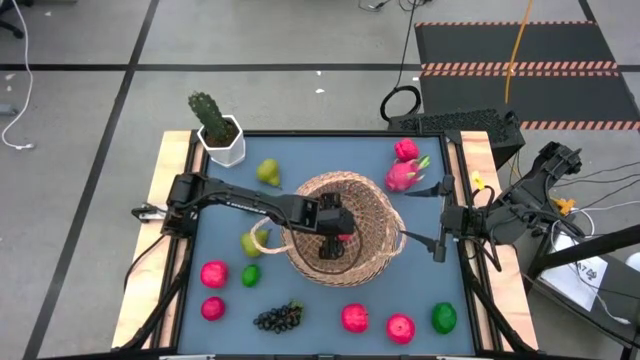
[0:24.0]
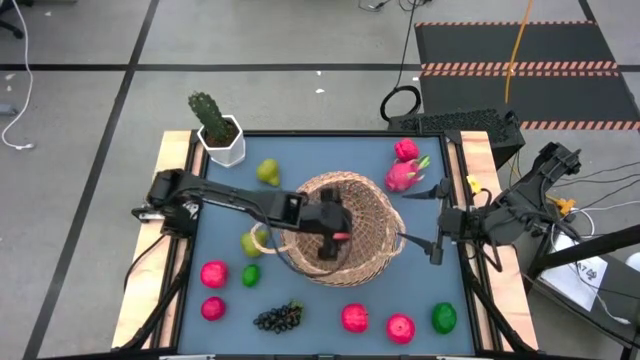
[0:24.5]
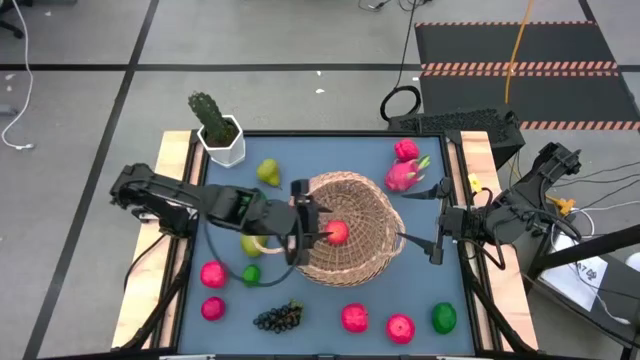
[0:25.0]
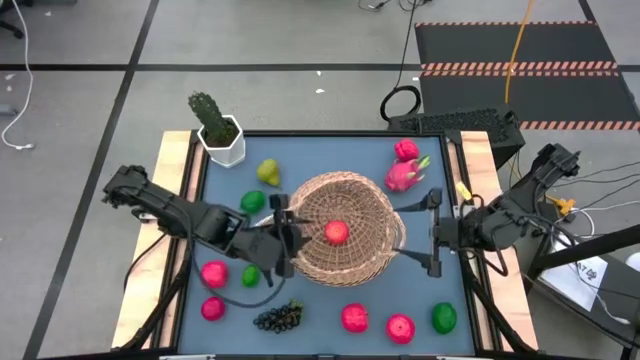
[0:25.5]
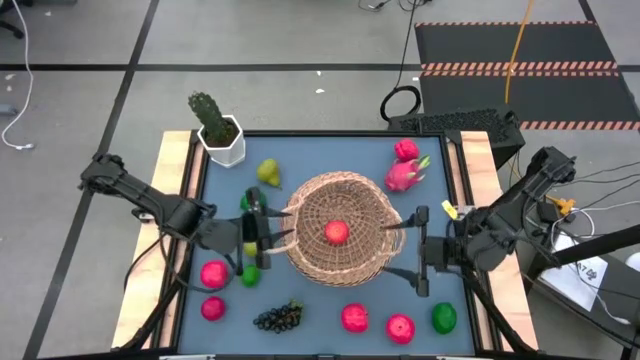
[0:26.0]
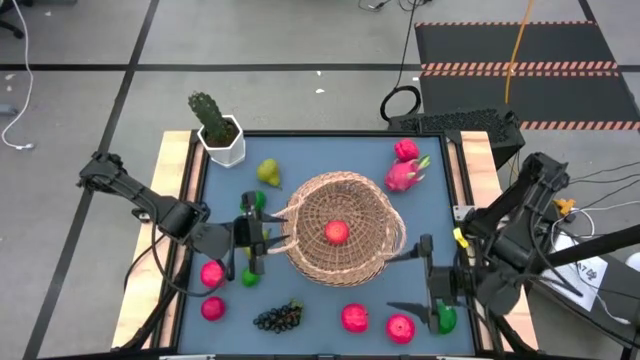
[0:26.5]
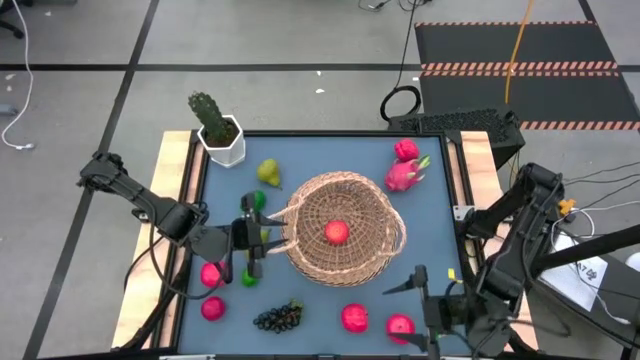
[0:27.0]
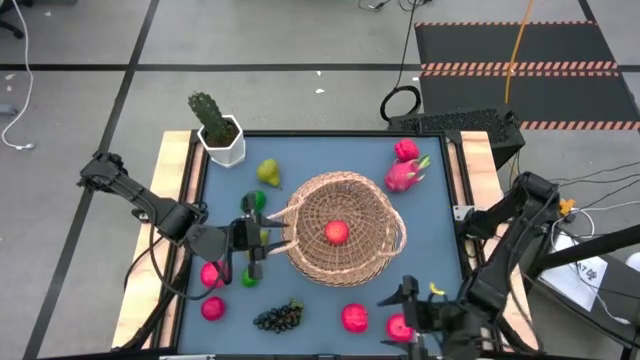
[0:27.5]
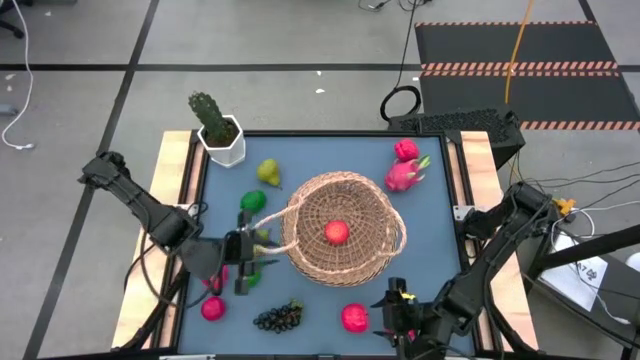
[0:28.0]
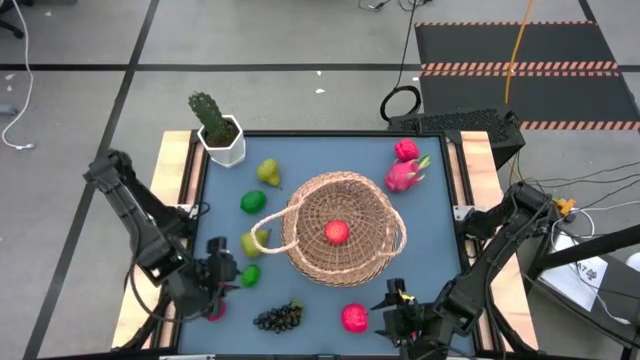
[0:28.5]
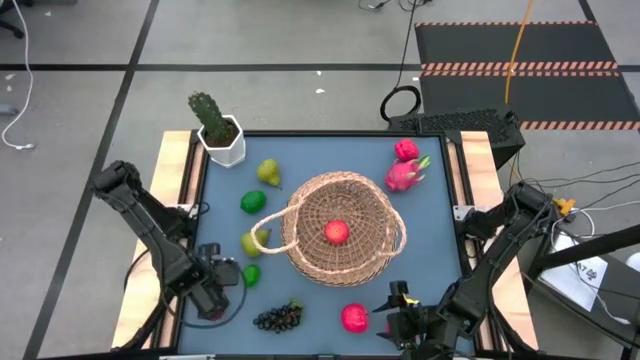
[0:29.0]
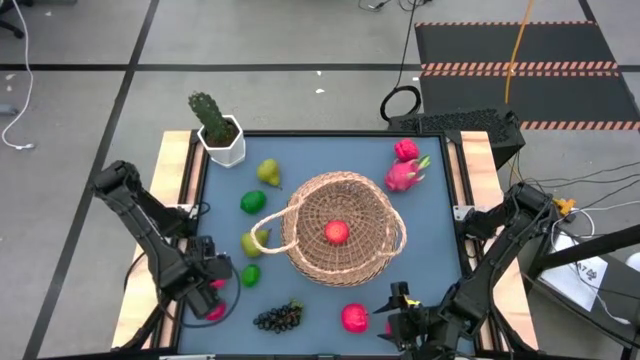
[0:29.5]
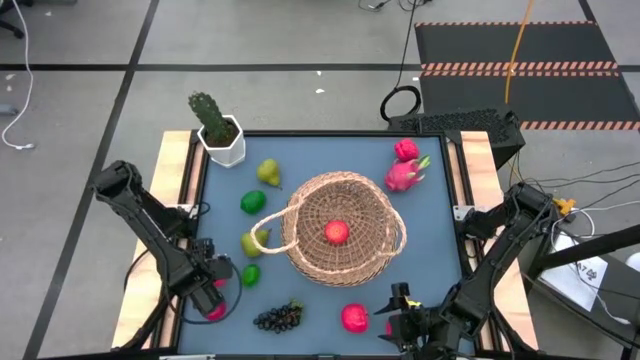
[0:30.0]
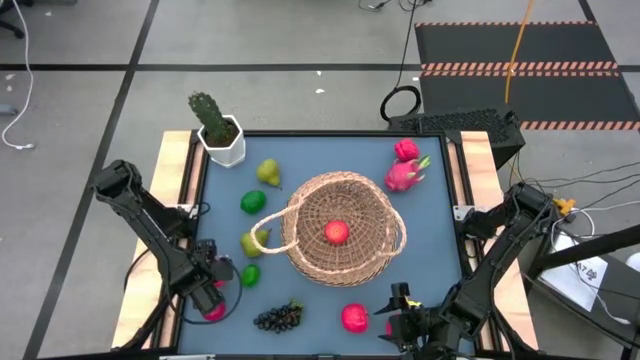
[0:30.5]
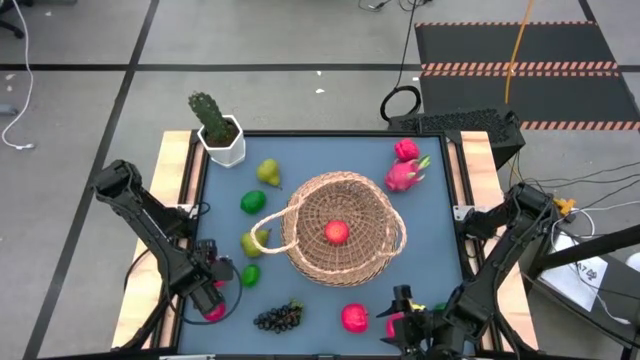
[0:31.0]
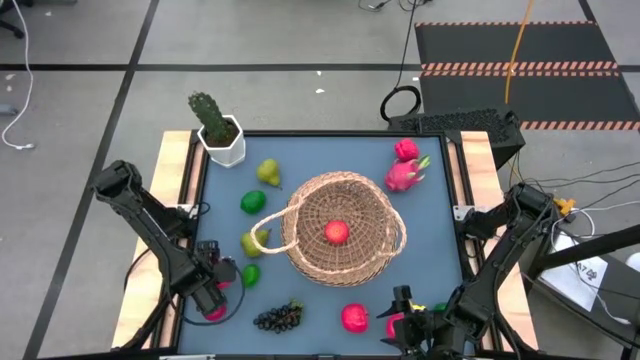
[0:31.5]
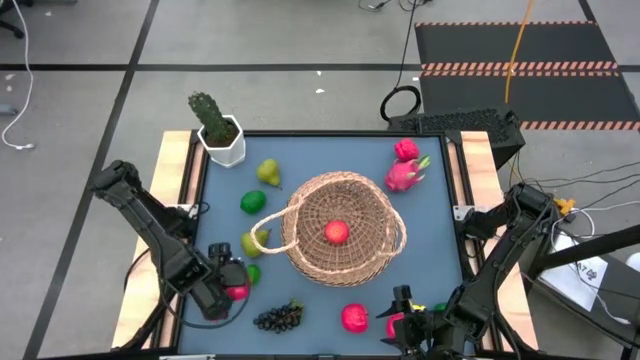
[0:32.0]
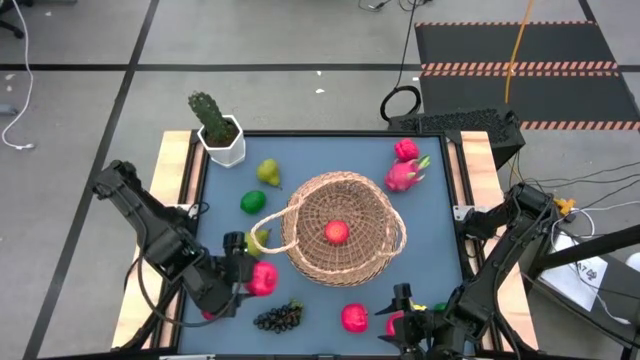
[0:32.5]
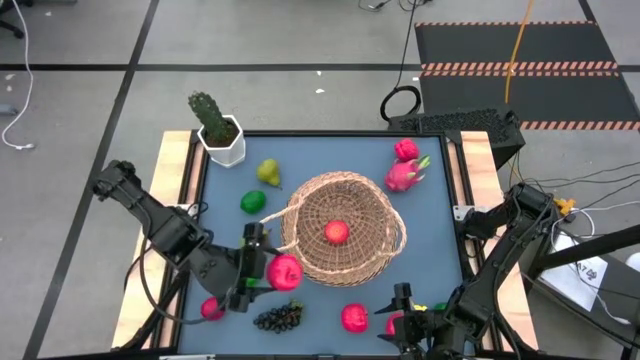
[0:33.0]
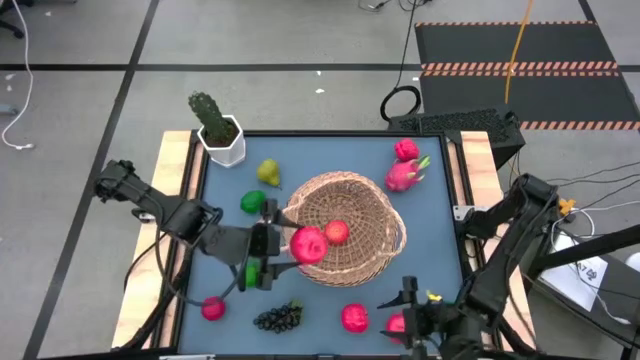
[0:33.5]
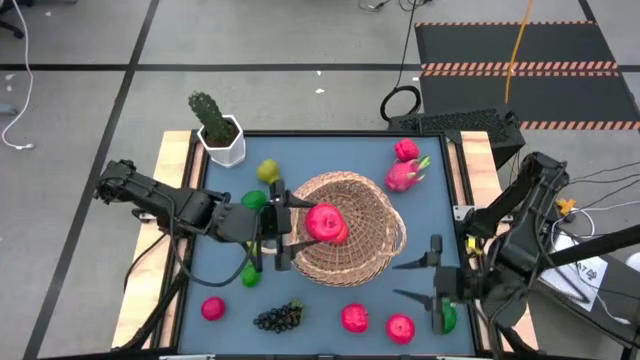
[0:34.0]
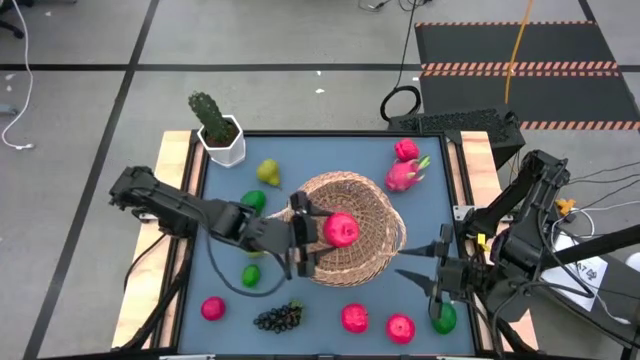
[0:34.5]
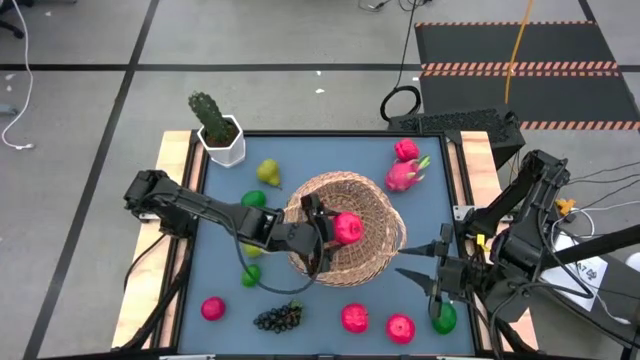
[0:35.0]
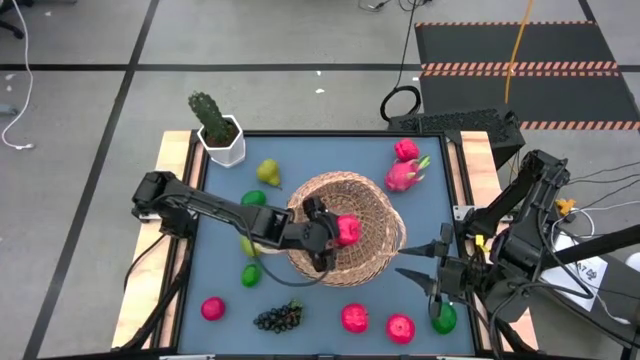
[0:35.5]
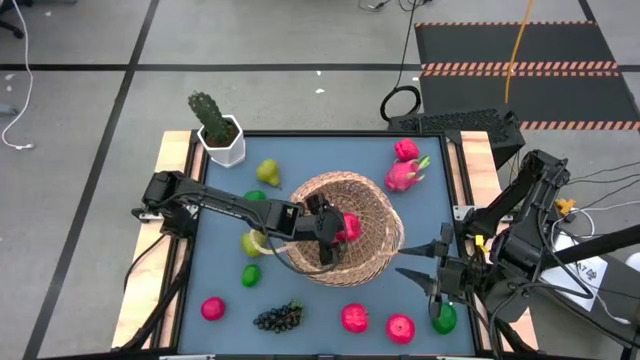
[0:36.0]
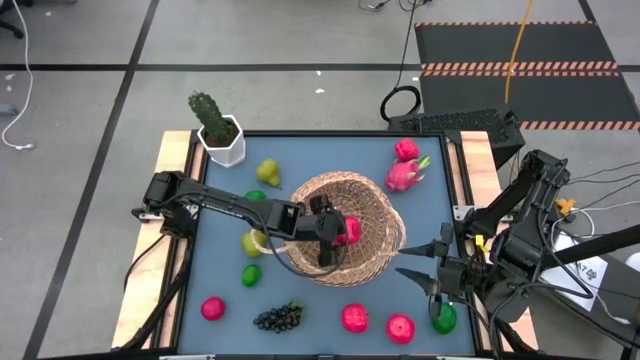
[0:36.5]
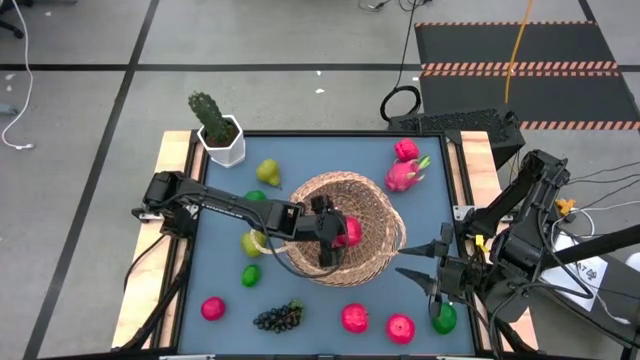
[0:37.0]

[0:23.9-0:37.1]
Task: Build produce basket
Put the red apple into the brown basket

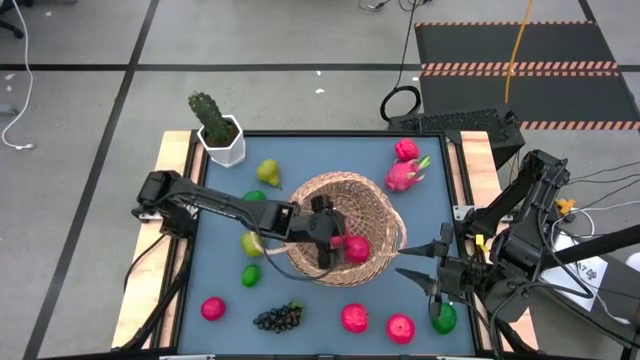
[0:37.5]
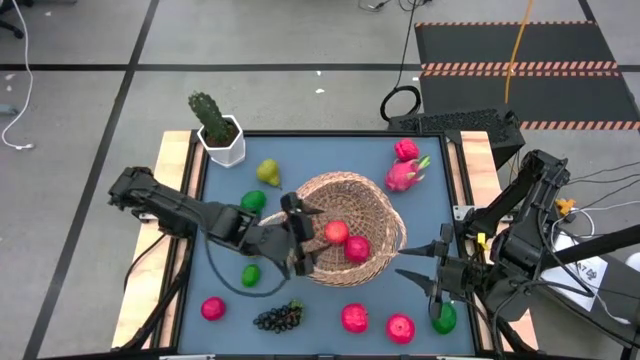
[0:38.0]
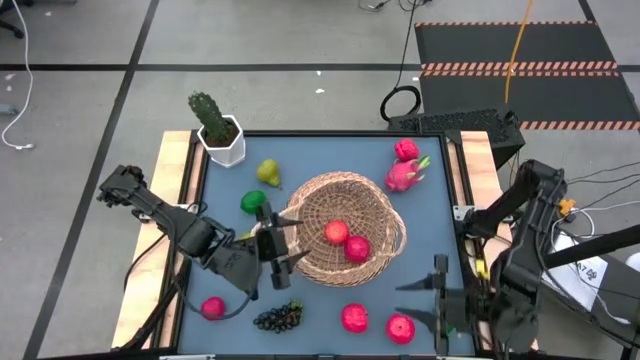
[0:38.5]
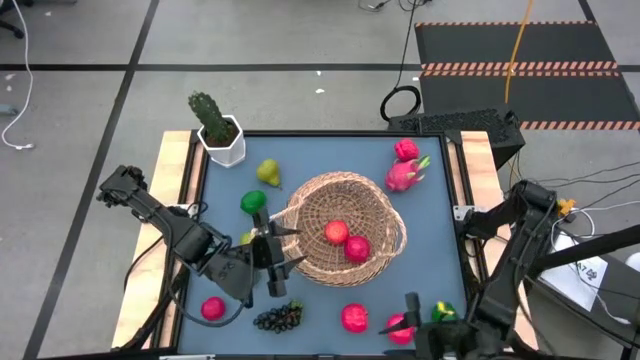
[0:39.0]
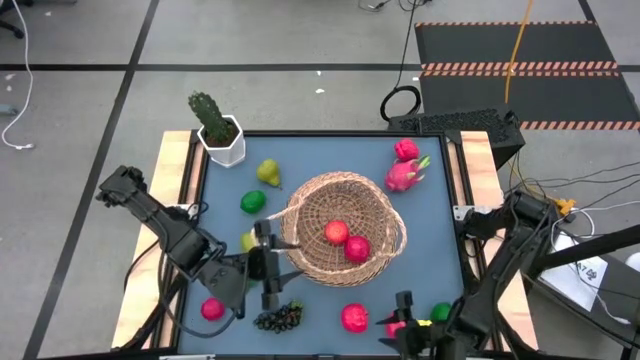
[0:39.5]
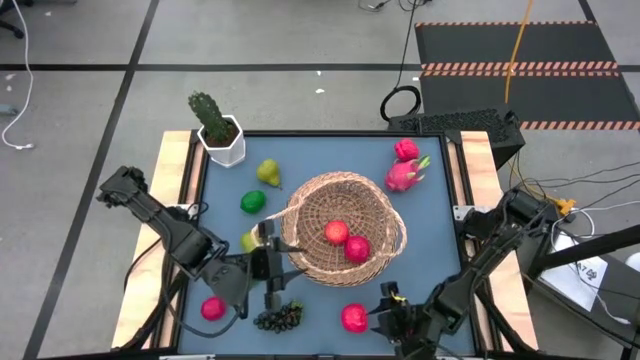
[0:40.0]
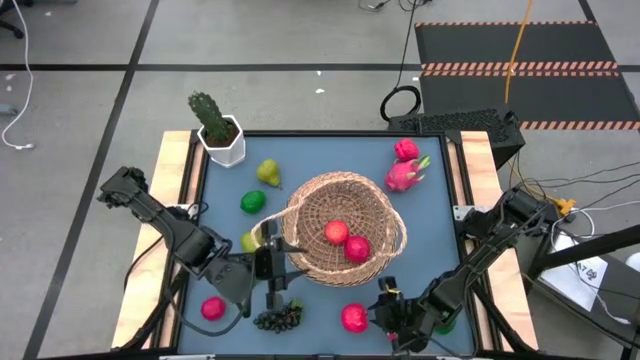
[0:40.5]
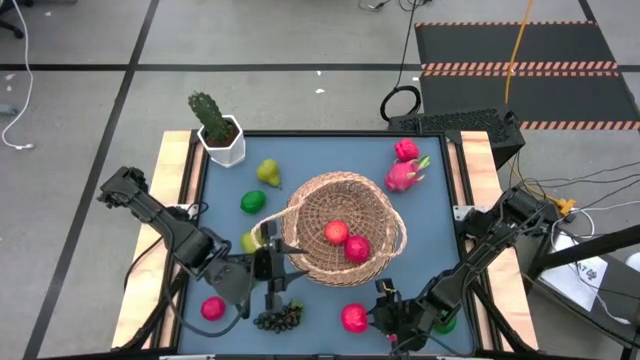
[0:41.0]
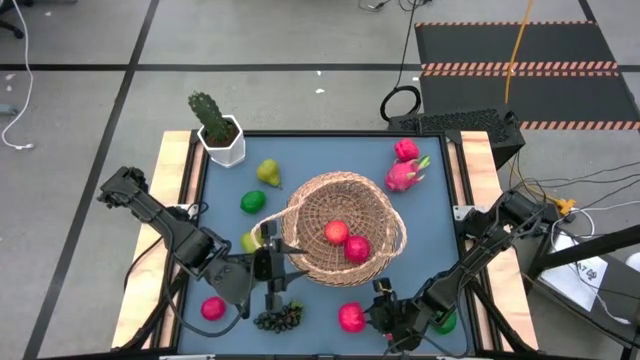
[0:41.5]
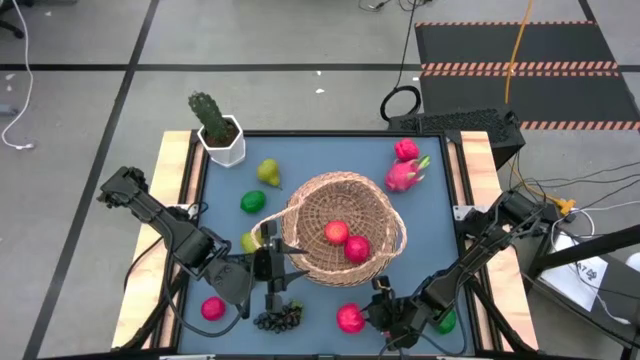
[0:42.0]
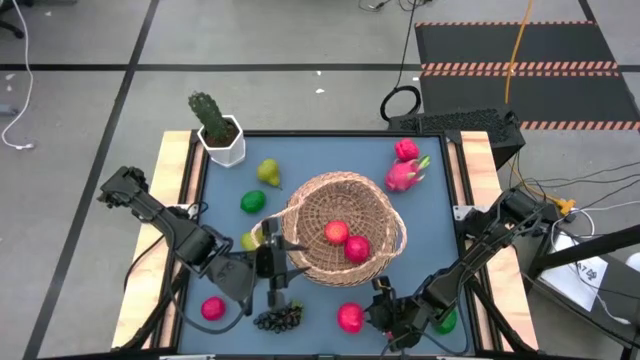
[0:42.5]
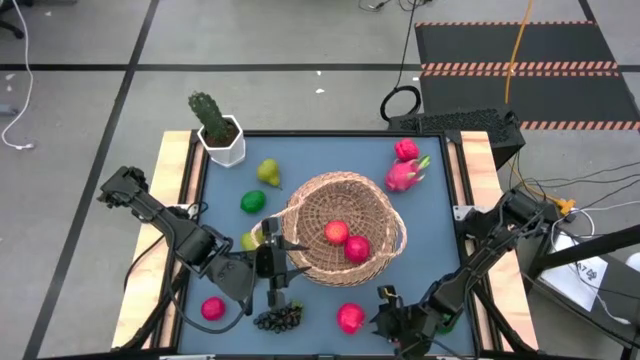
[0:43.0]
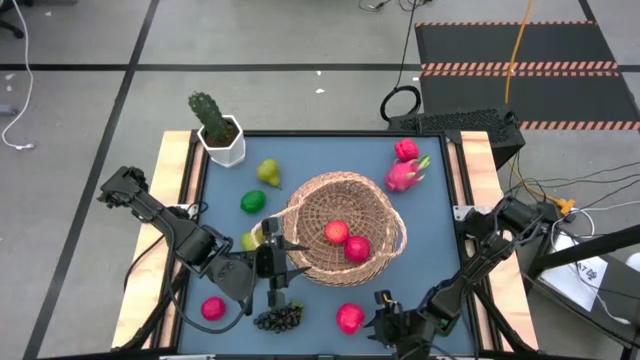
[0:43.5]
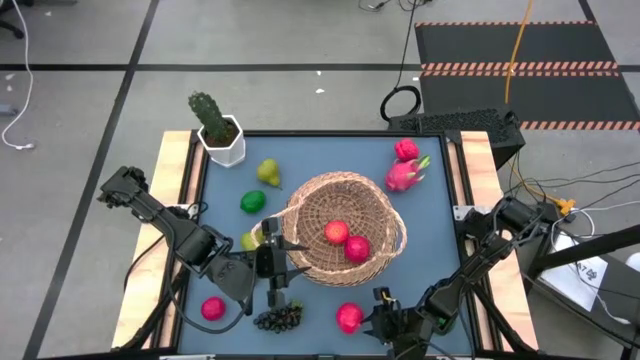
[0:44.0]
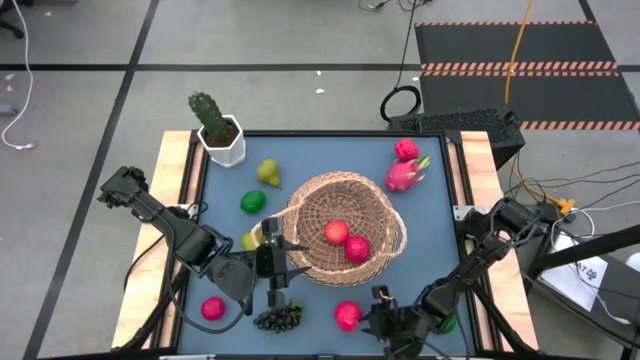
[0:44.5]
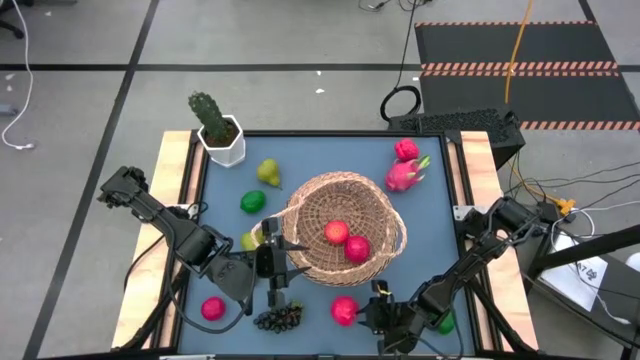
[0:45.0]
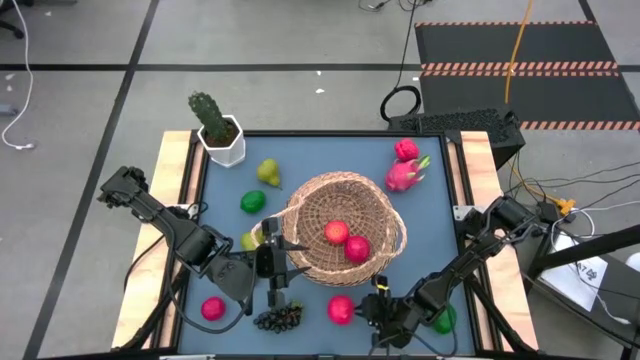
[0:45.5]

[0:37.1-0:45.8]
Put the middle red apple into the brown basket
